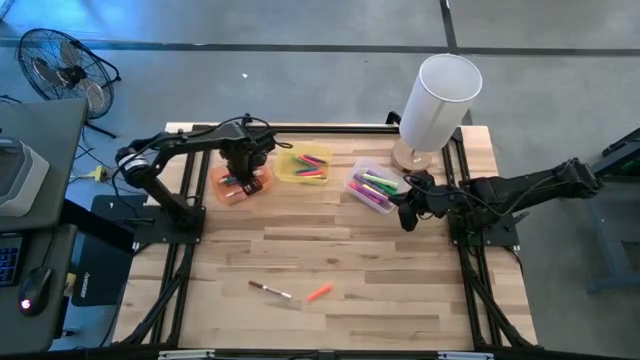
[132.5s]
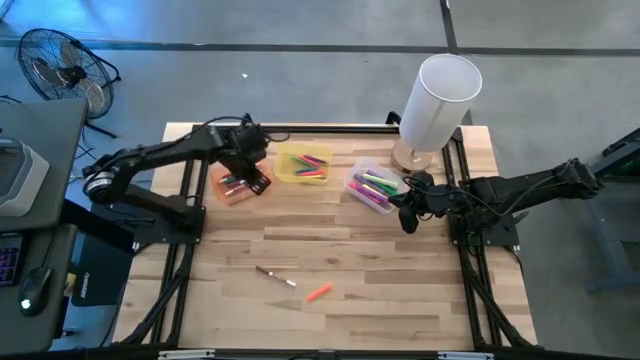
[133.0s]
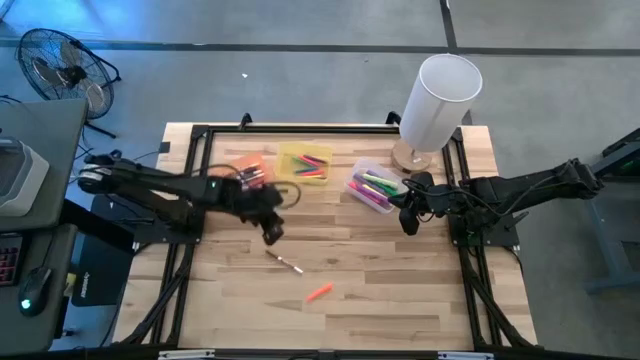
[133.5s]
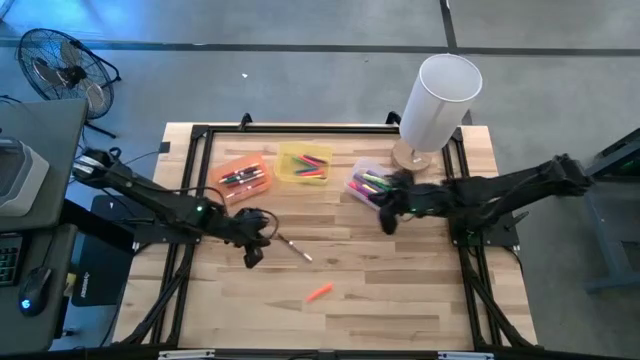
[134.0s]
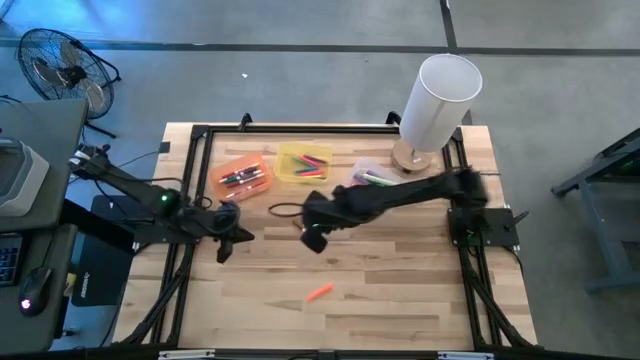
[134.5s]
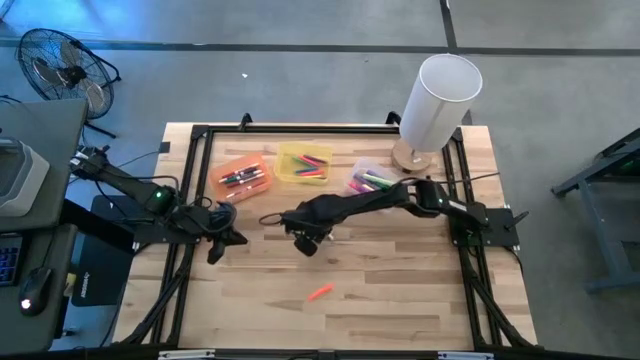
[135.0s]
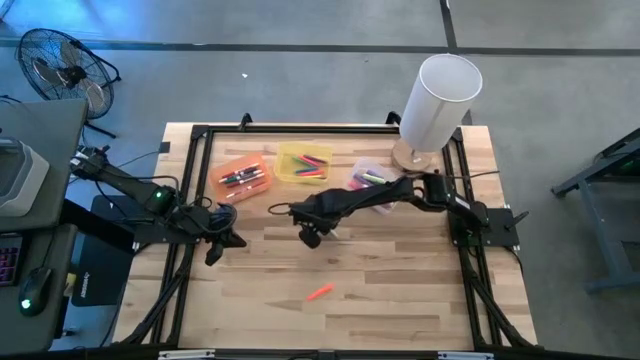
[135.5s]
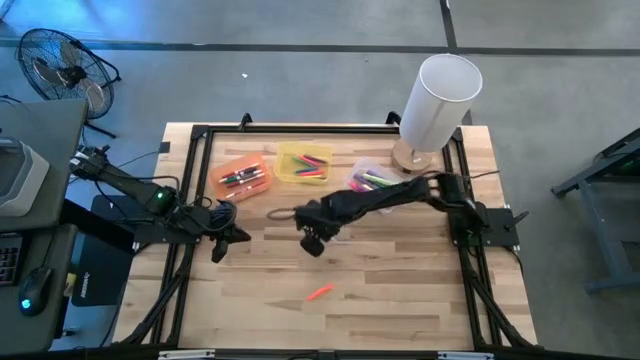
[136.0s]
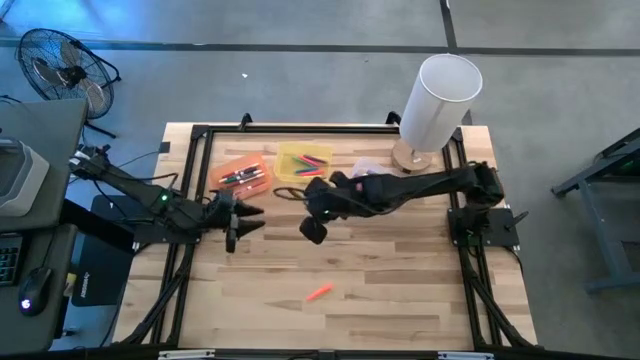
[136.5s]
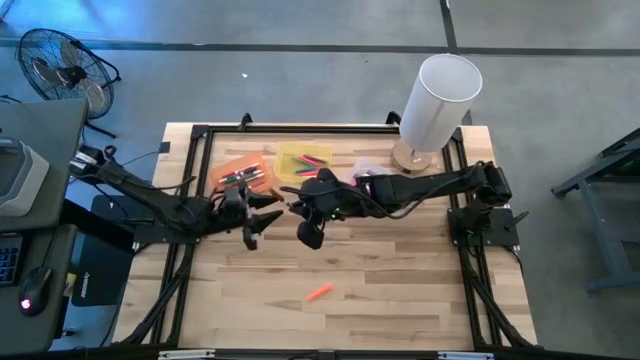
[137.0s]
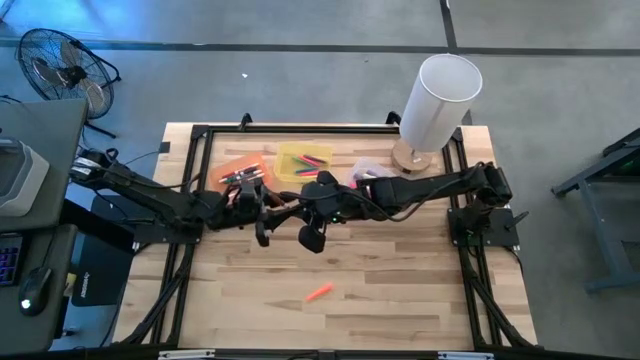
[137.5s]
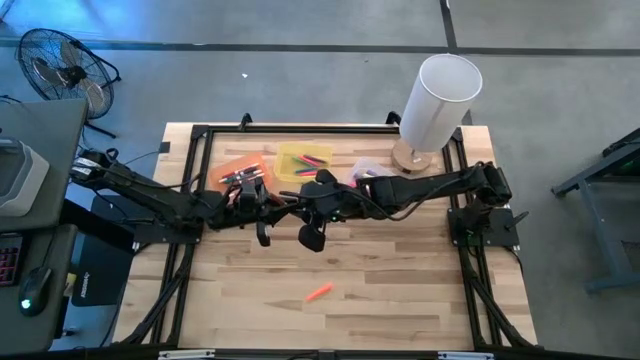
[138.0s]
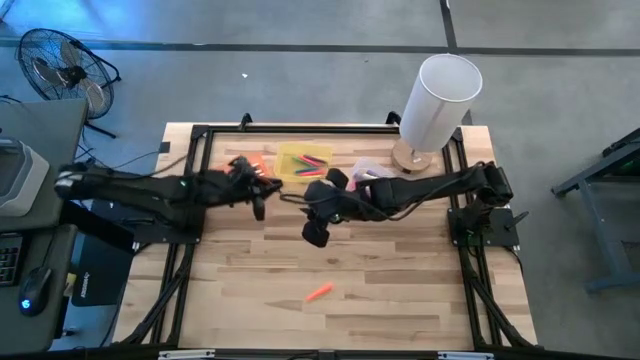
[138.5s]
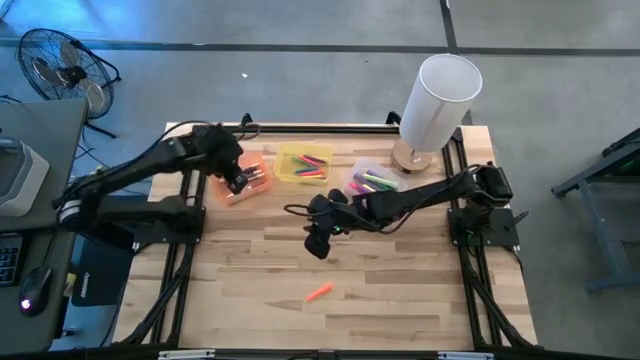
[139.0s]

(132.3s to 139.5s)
Task: Pick & Place Markers
Put the brown marker pen into the orange bin

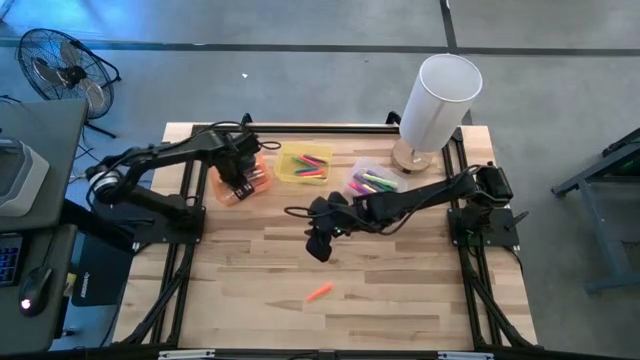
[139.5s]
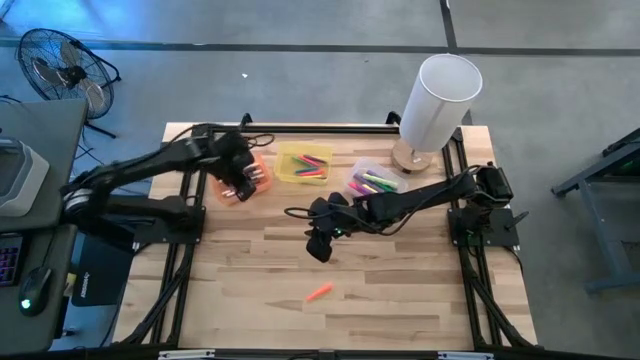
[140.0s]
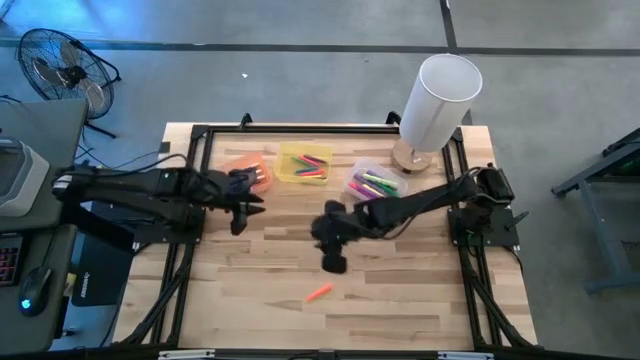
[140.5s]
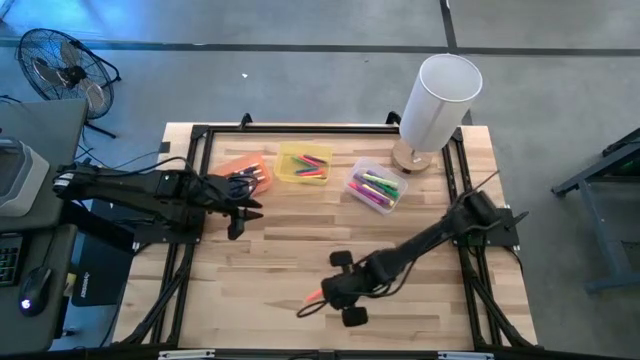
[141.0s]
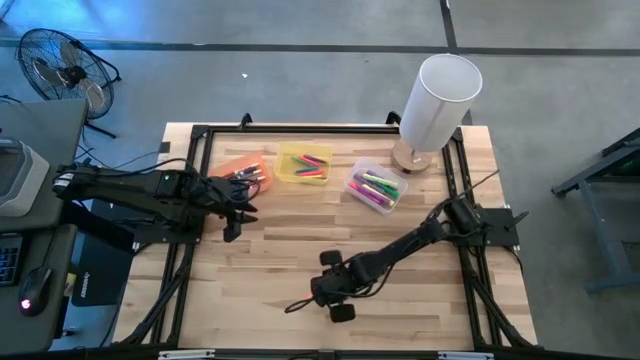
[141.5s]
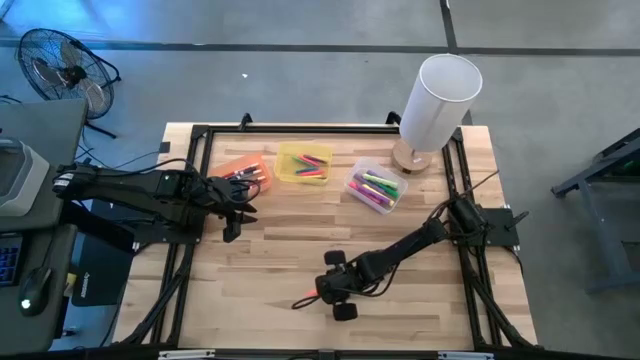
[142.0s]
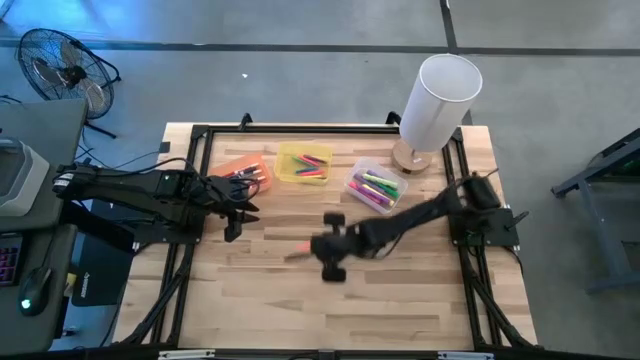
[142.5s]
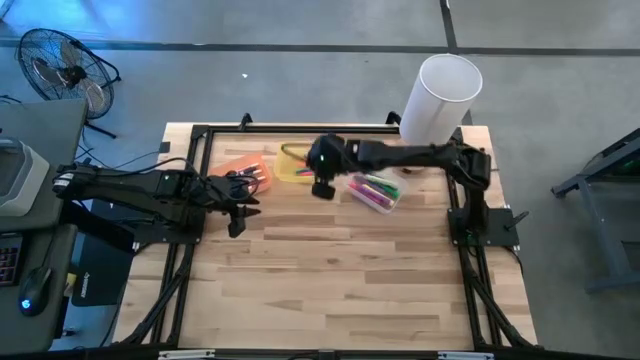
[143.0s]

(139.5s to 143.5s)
Put the orange pen into the yellow bin

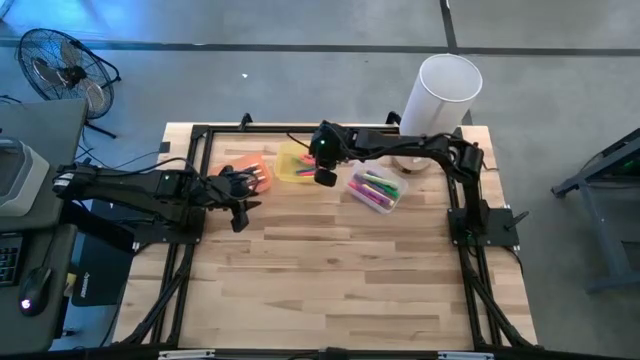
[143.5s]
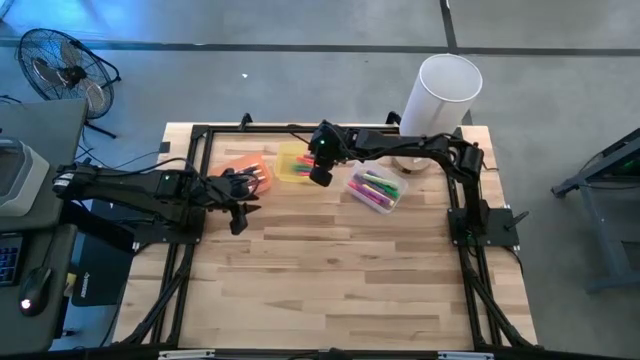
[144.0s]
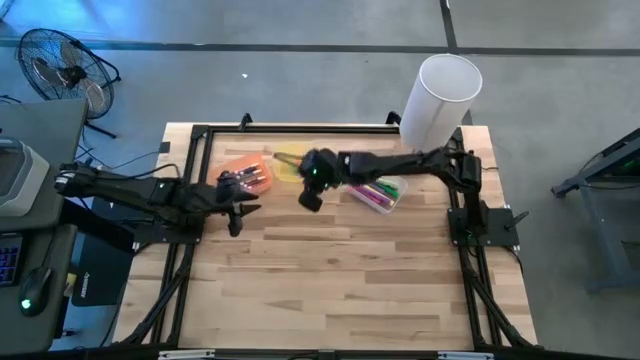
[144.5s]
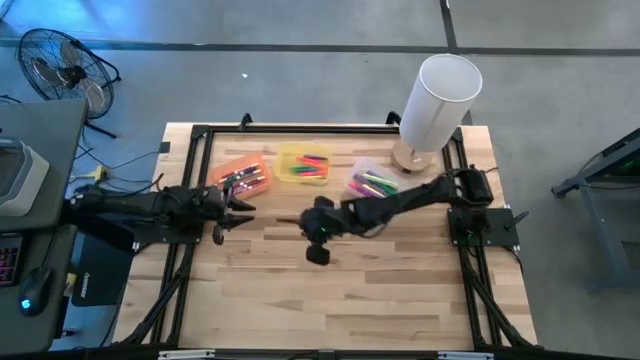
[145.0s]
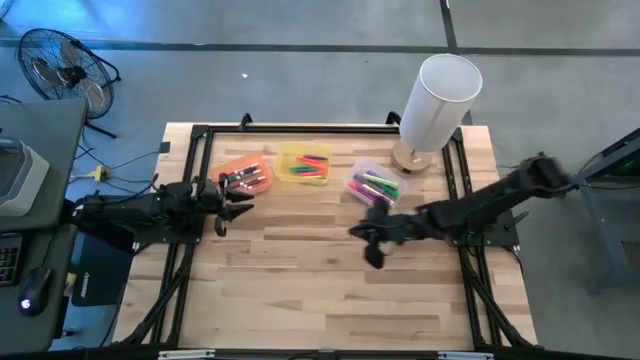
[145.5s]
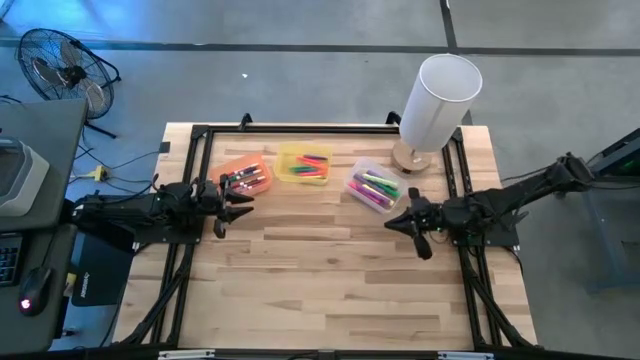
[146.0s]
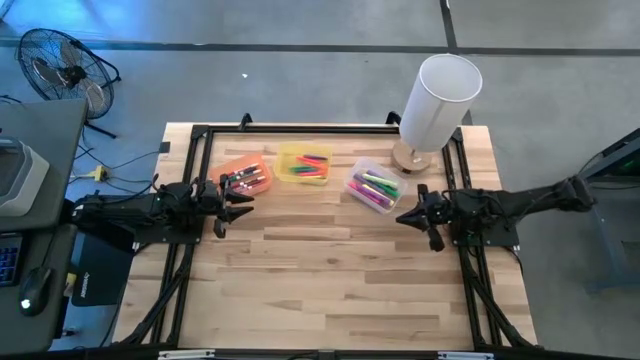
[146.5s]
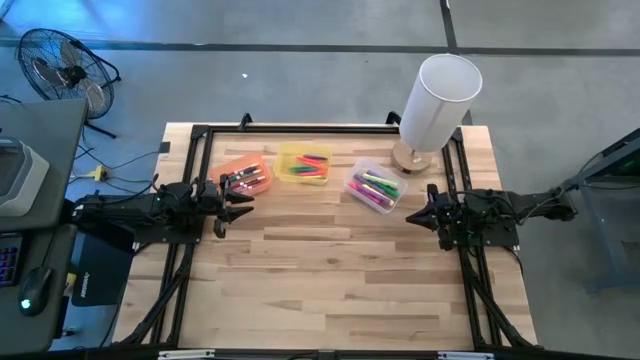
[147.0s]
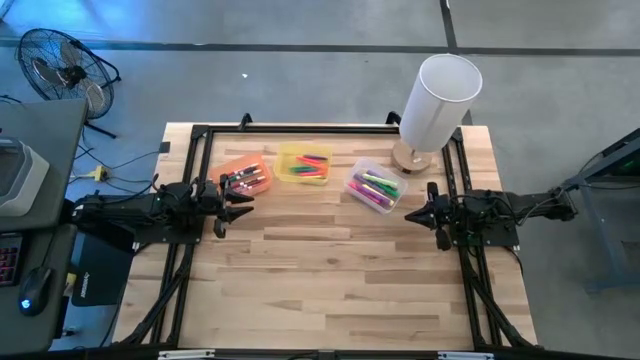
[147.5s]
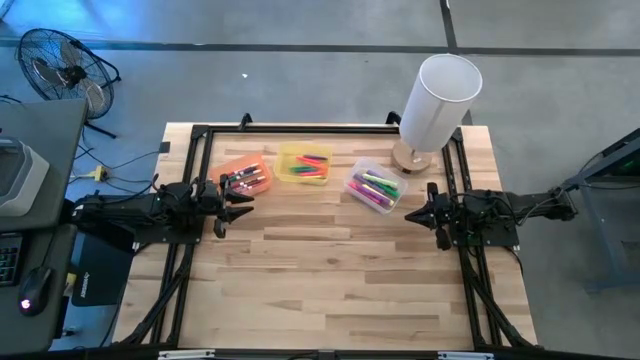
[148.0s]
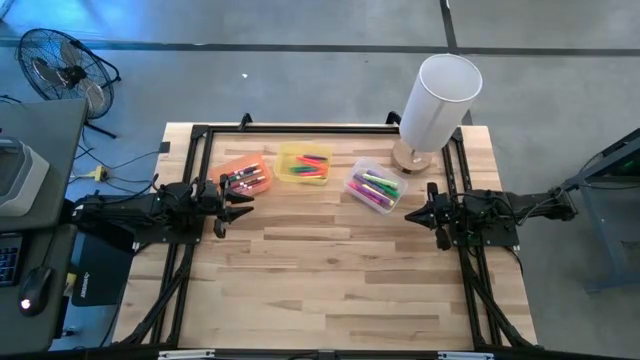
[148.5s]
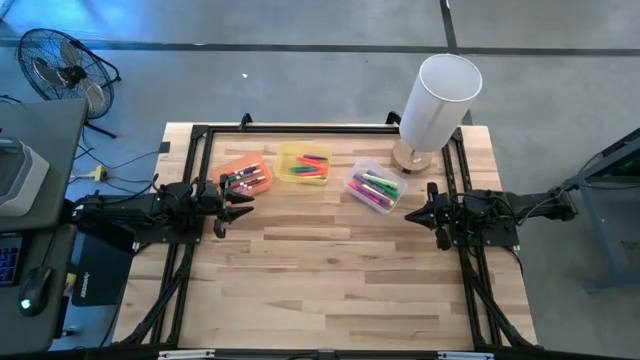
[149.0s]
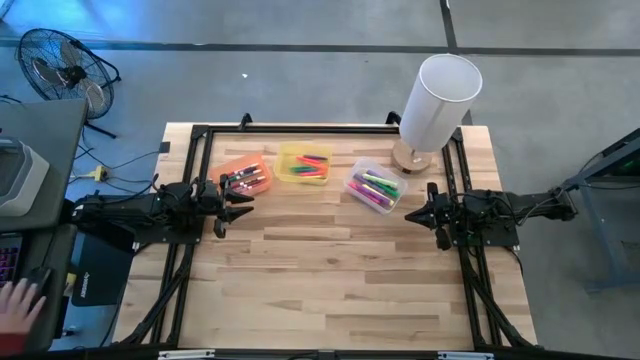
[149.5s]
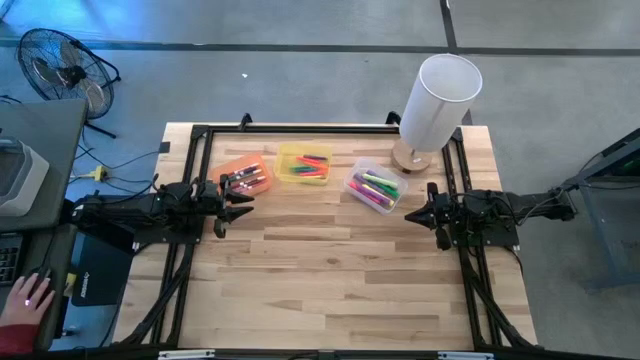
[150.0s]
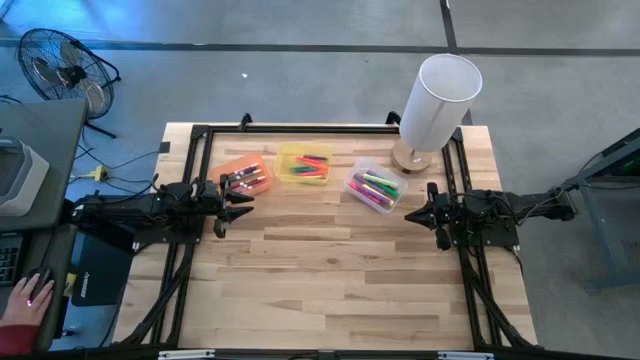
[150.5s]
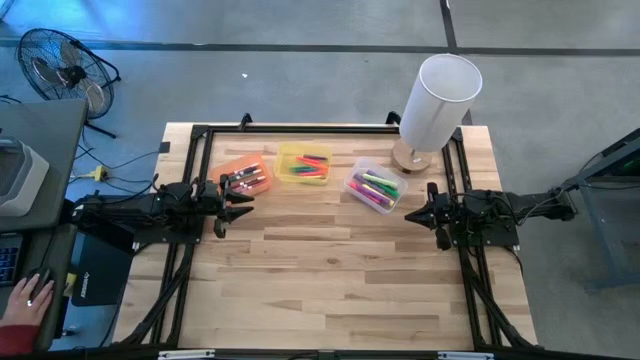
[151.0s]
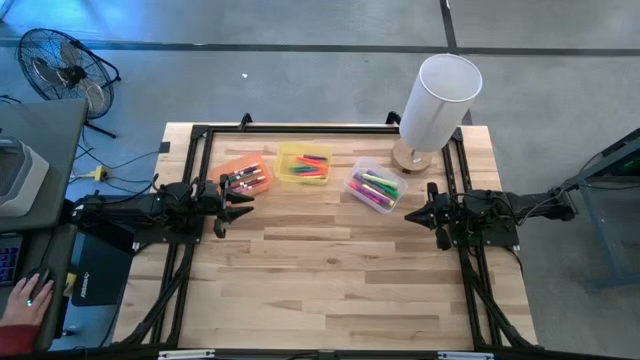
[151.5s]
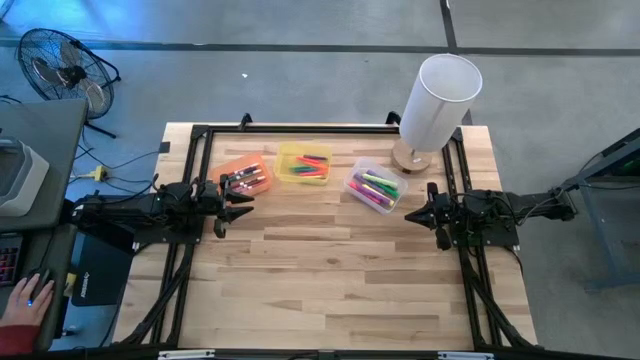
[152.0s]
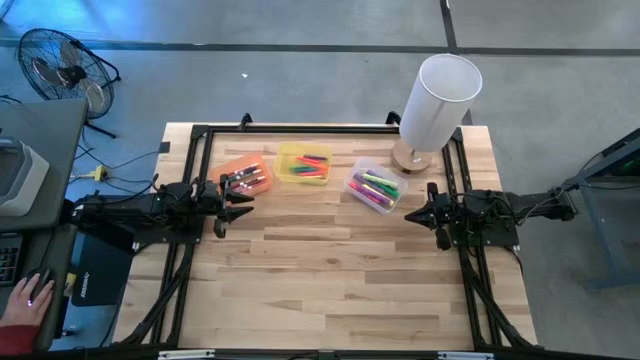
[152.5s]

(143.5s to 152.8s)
Return to Home Position

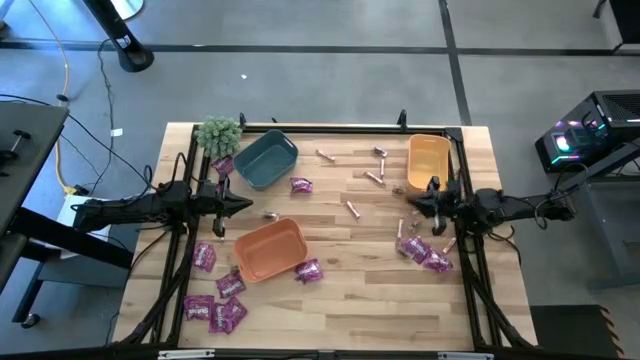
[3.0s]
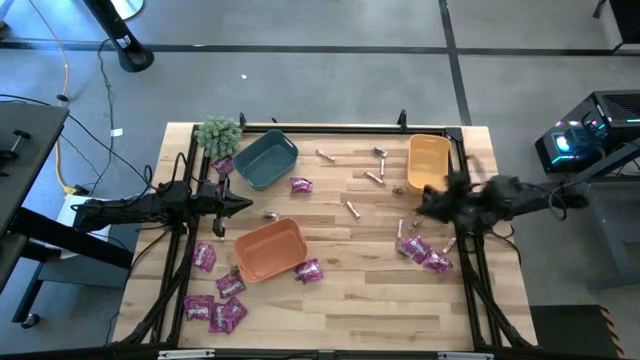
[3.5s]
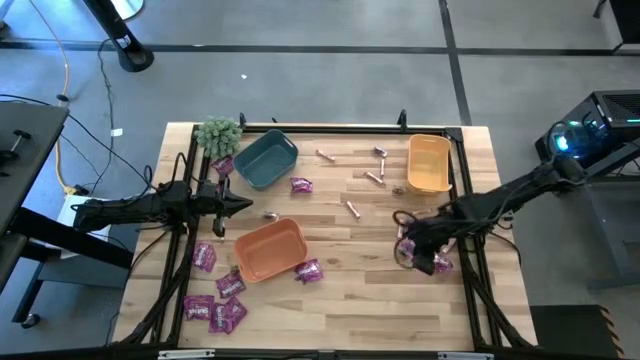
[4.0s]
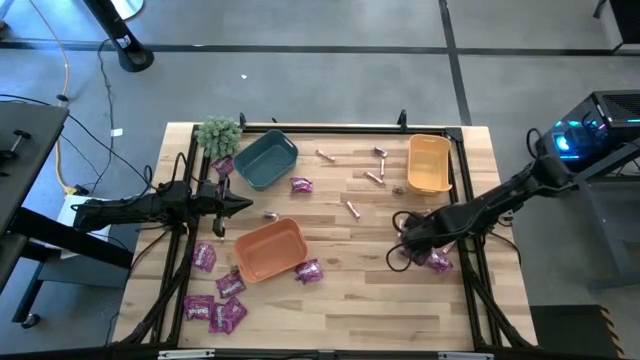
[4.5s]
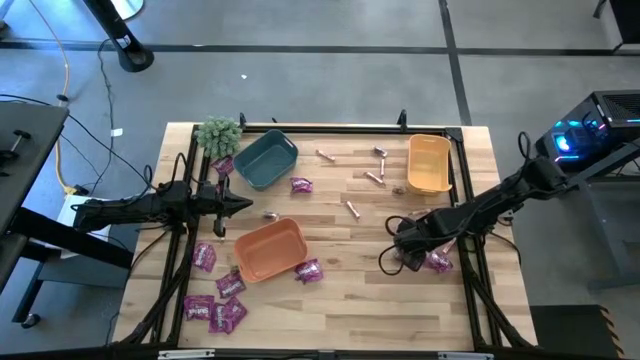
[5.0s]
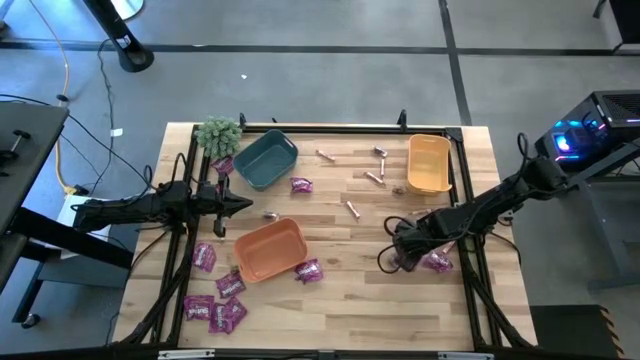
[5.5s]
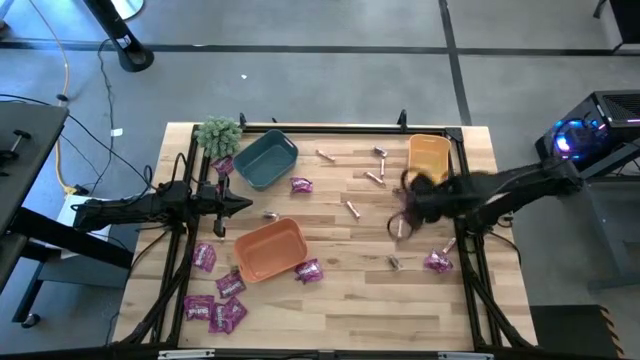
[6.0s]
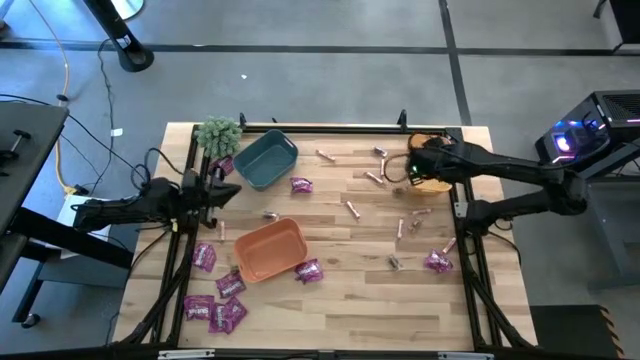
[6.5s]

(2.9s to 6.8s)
Task: Sort candy
Put the purple candy into the yellow bin
